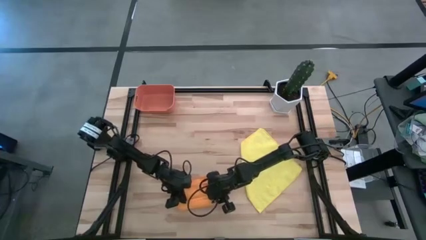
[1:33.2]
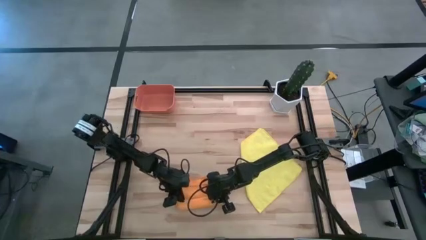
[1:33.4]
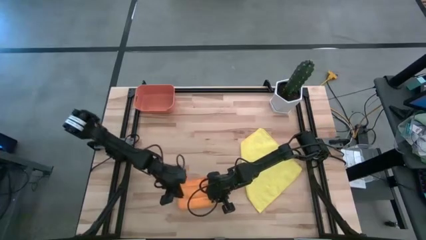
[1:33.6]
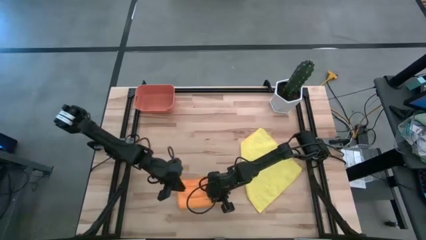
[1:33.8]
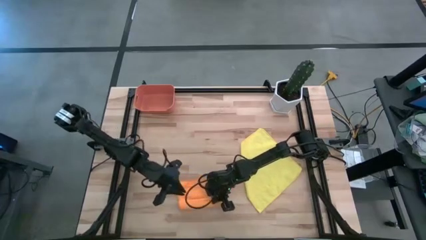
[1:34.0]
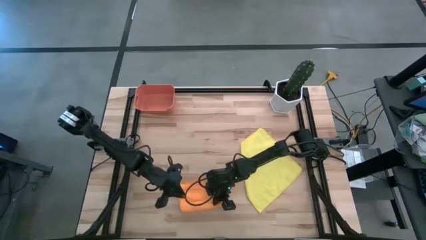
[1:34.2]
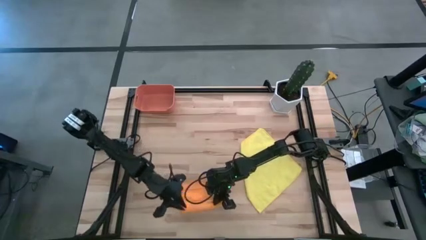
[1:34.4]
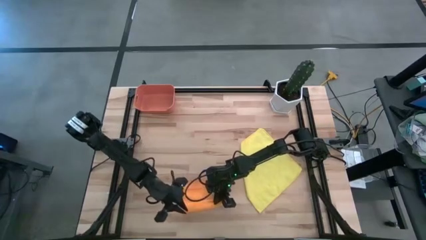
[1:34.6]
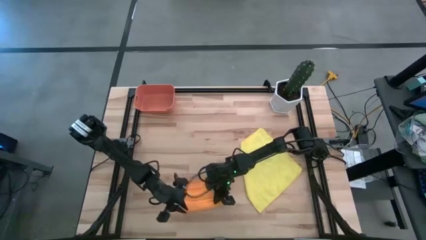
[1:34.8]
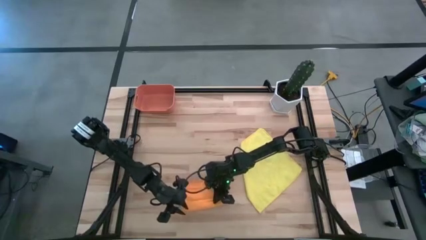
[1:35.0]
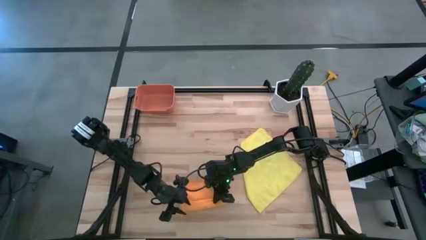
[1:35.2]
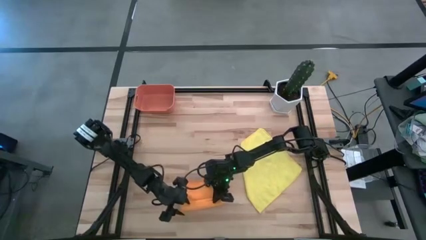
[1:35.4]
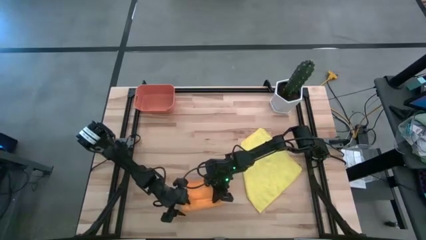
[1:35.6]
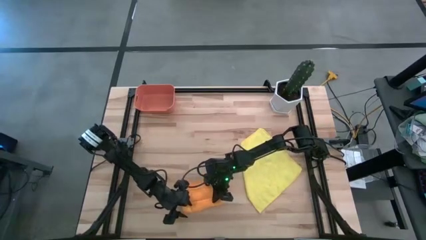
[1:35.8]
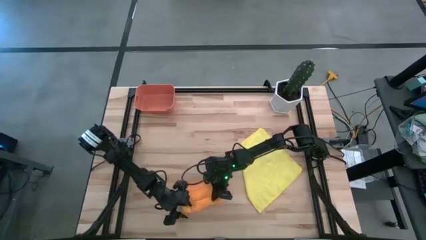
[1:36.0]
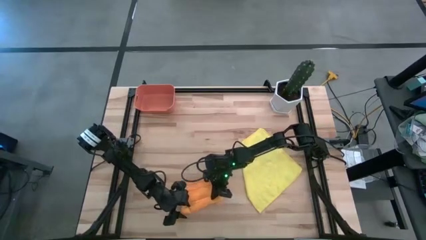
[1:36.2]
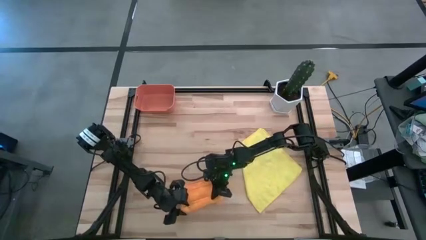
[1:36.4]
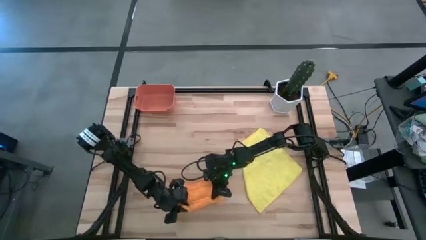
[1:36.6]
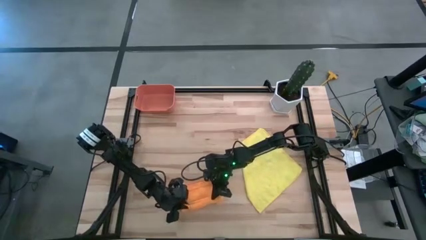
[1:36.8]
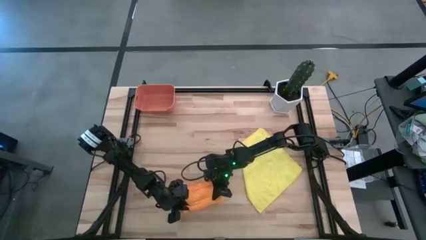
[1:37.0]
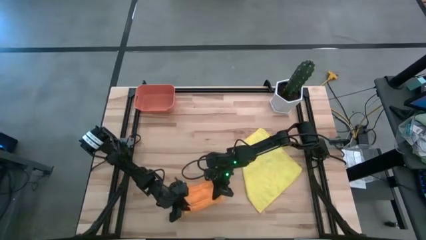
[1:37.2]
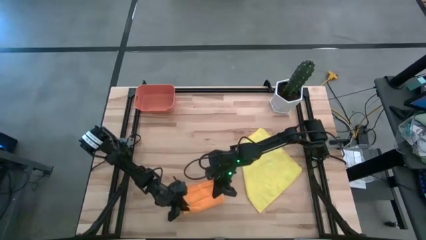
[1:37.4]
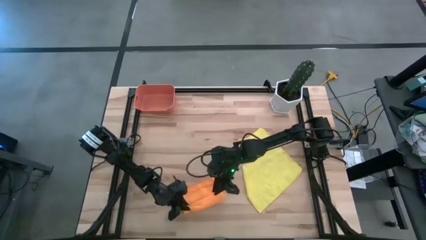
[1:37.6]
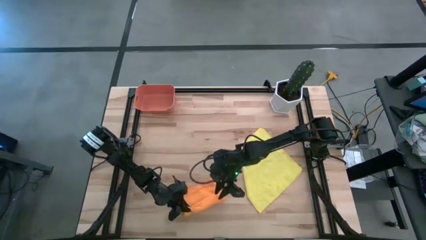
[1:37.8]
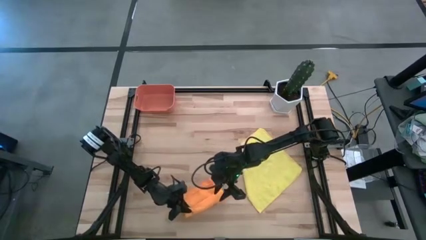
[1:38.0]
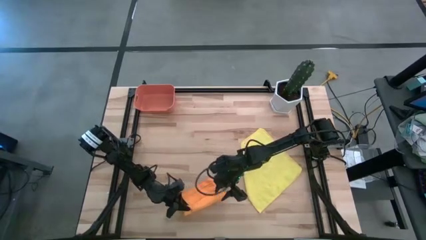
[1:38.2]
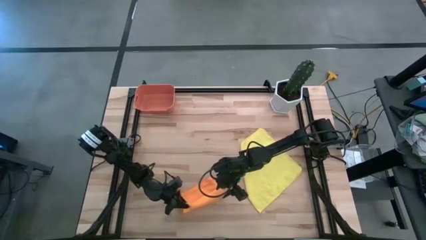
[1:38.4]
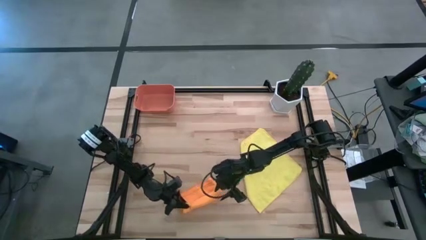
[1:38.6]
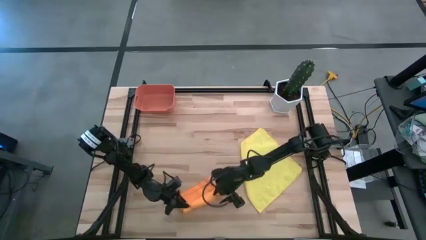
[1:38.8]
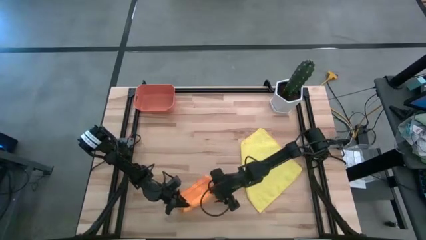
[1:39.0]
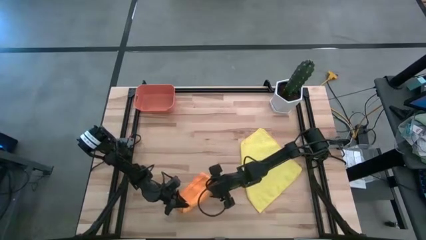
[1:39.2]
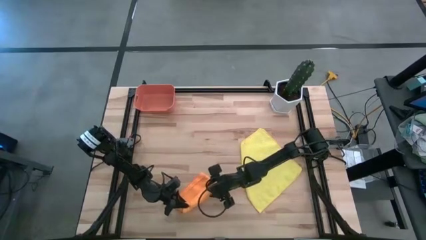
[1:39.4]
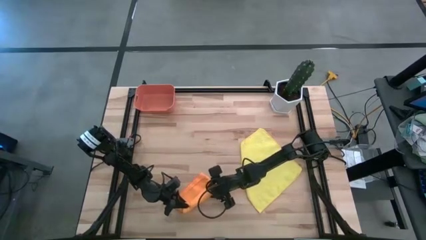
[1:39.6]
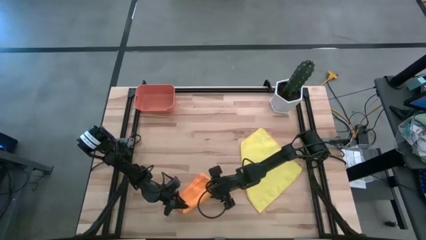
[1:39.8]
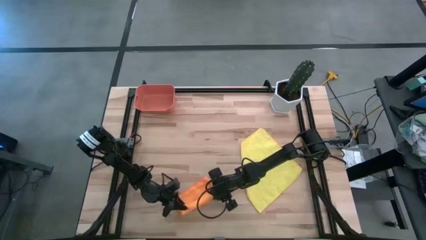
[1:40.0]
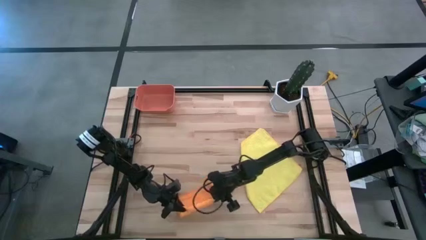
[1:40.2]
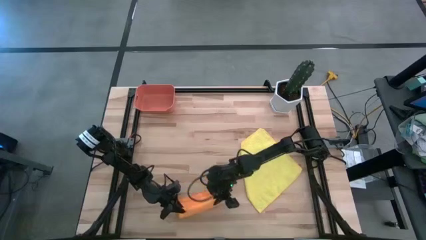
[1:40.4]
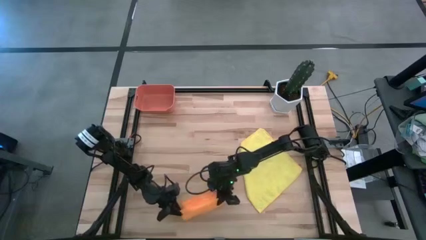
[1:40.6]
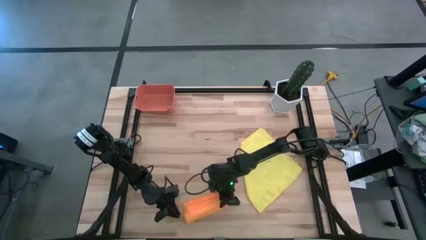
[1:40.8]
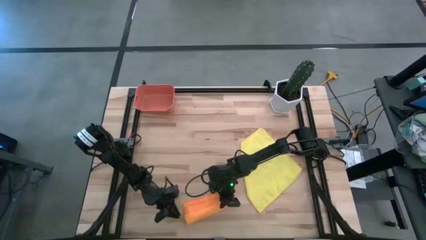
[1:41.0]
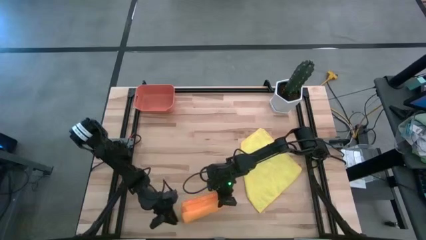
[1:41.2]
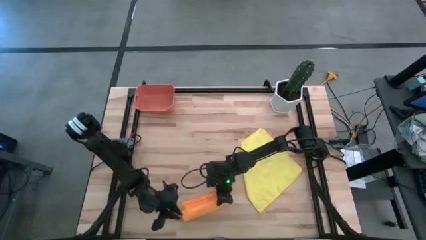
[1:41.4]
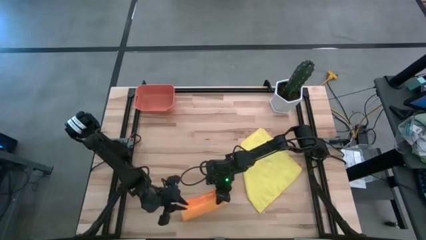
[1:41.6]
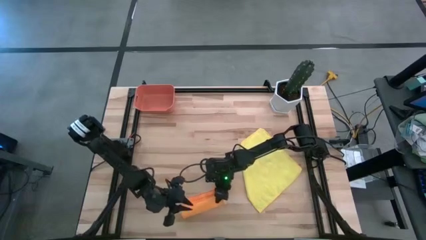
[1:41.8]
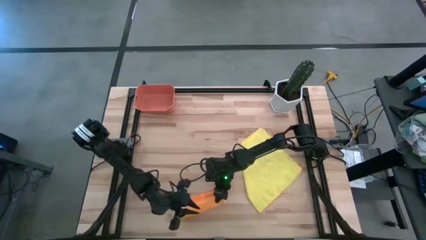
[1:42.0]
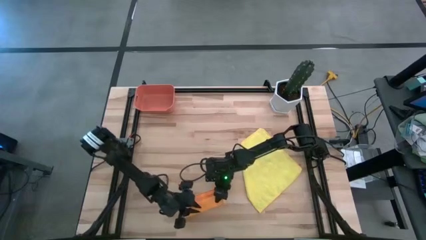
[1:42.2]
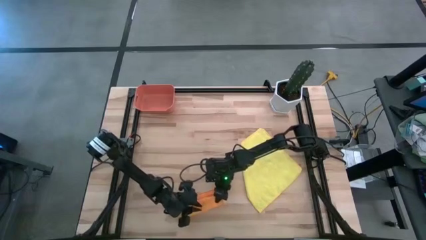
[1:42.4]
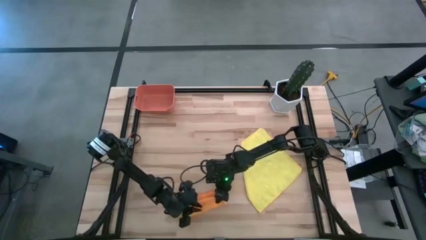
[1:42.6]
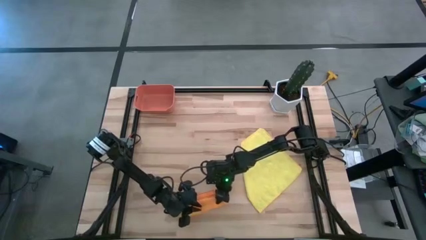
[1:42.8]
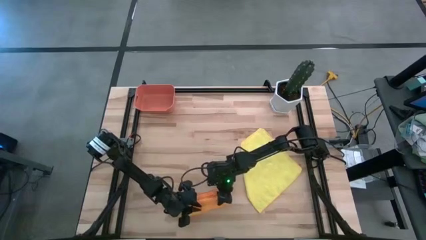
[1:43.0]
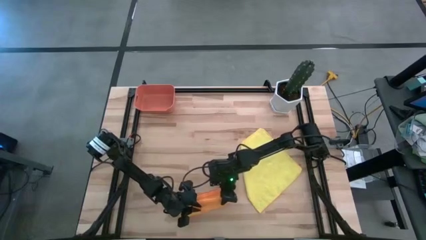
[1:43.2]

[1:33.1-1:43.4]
Task: Roll microfiber towels into tight, uniform cylinder then place into a basket
Roll the orange towel
